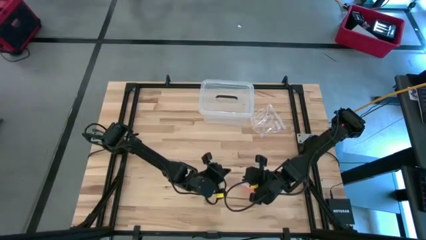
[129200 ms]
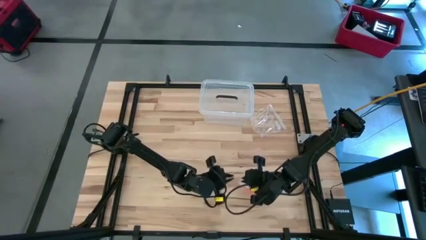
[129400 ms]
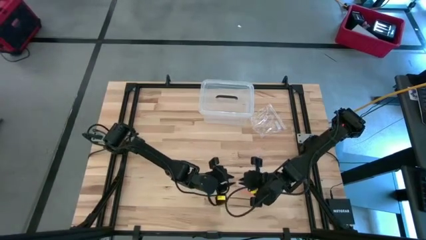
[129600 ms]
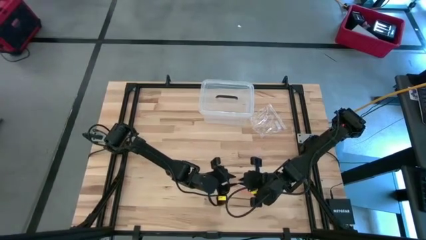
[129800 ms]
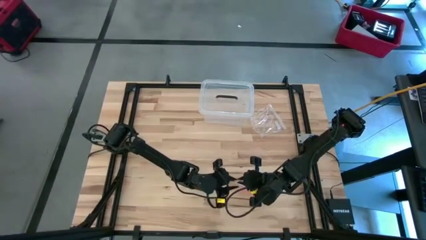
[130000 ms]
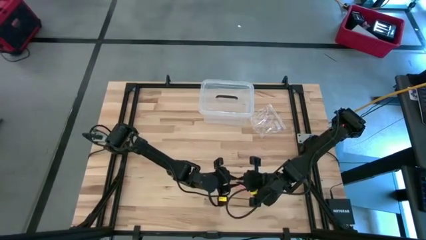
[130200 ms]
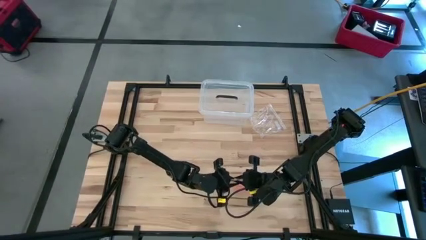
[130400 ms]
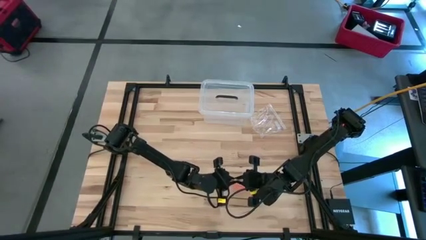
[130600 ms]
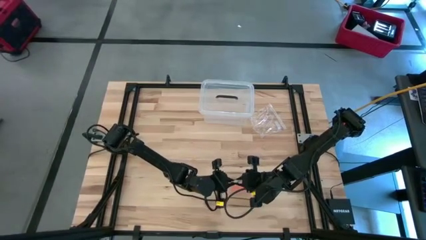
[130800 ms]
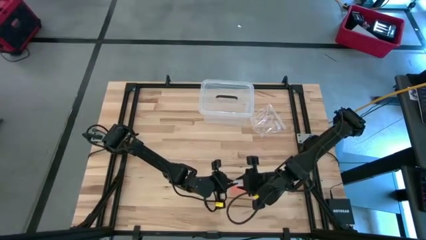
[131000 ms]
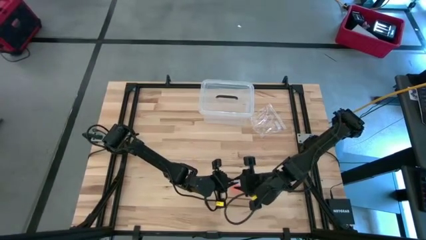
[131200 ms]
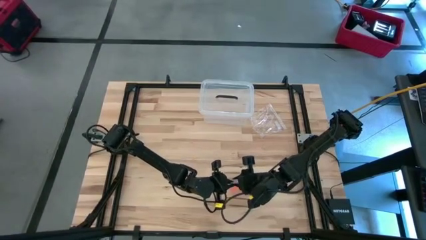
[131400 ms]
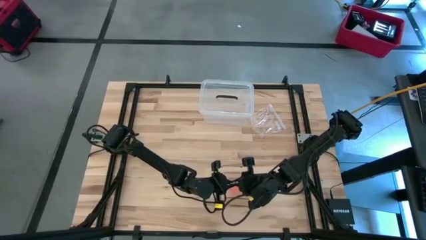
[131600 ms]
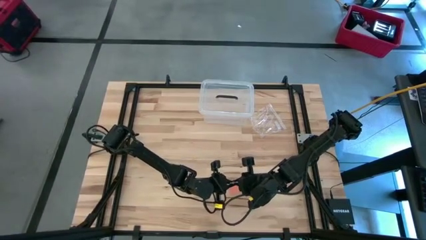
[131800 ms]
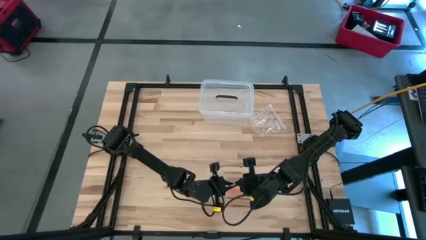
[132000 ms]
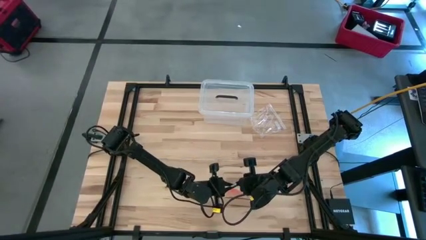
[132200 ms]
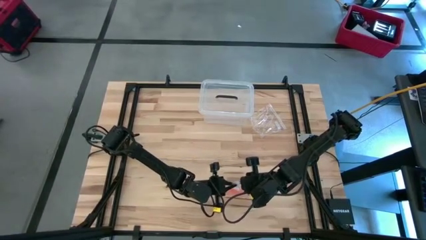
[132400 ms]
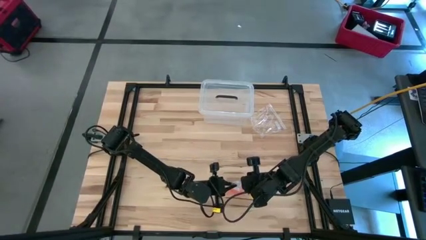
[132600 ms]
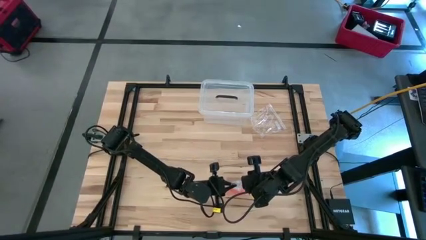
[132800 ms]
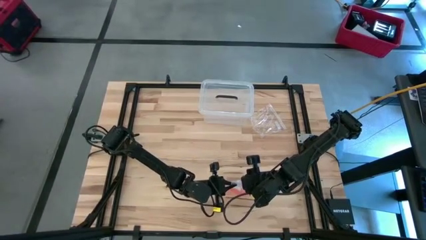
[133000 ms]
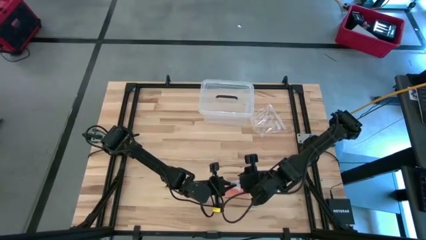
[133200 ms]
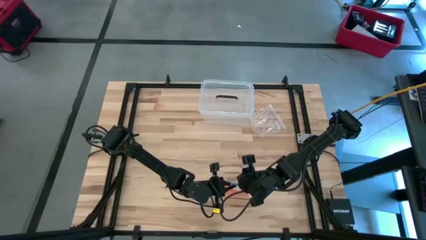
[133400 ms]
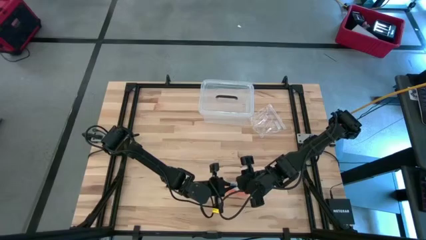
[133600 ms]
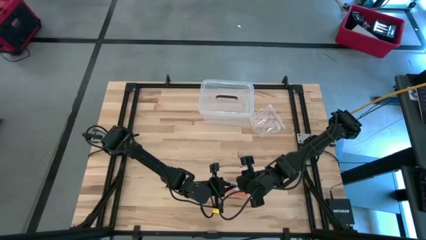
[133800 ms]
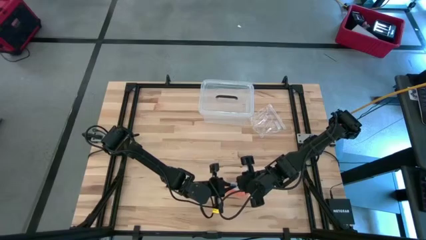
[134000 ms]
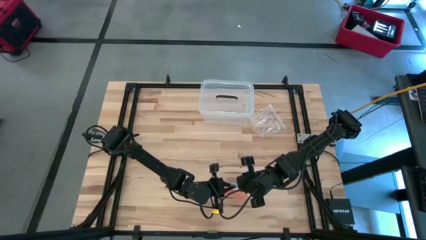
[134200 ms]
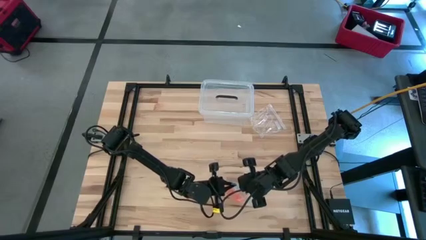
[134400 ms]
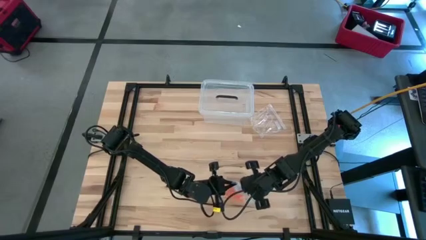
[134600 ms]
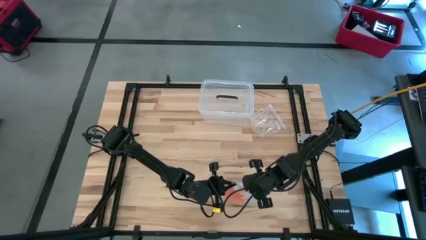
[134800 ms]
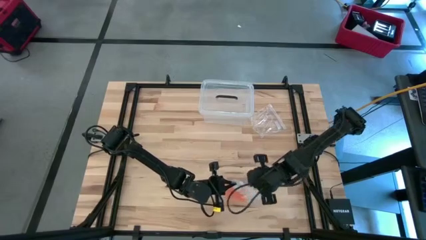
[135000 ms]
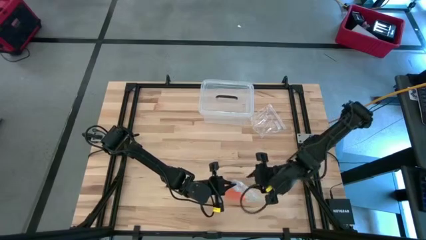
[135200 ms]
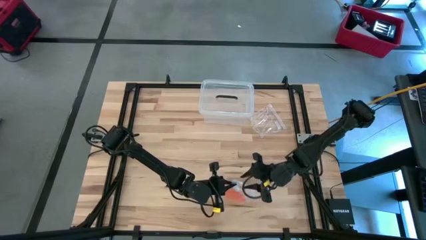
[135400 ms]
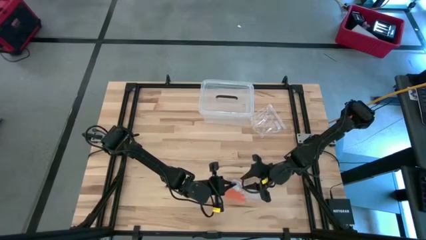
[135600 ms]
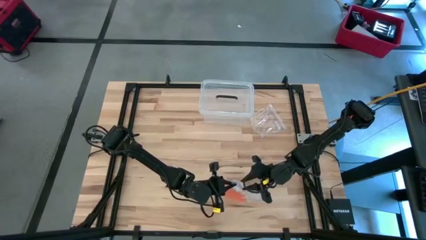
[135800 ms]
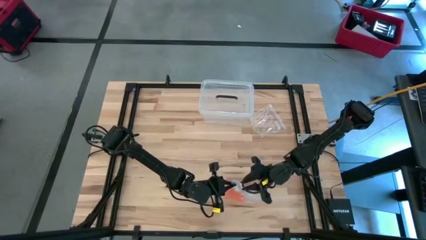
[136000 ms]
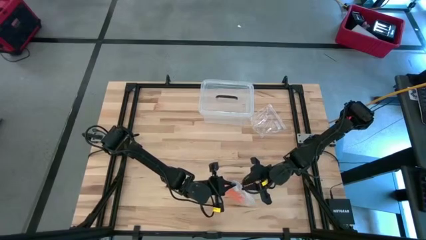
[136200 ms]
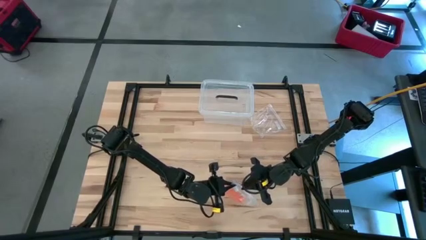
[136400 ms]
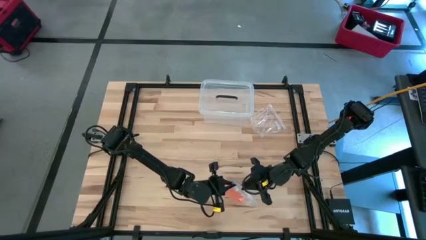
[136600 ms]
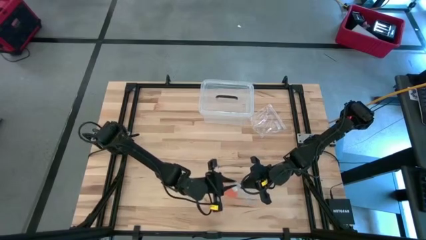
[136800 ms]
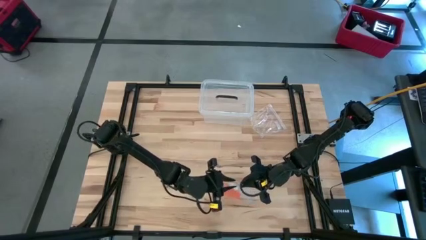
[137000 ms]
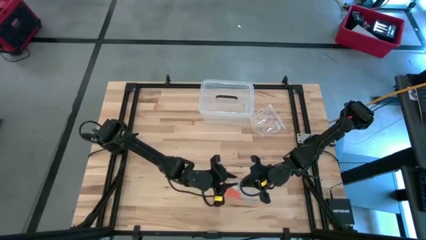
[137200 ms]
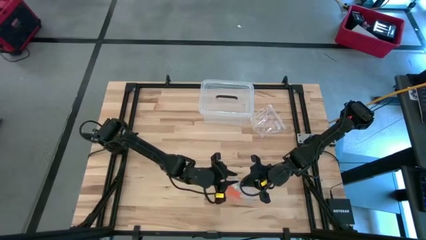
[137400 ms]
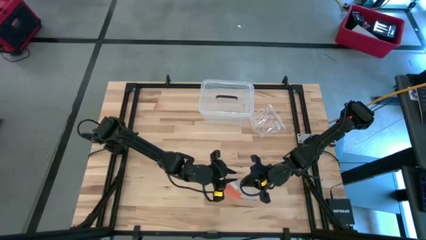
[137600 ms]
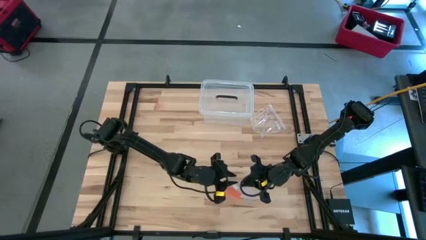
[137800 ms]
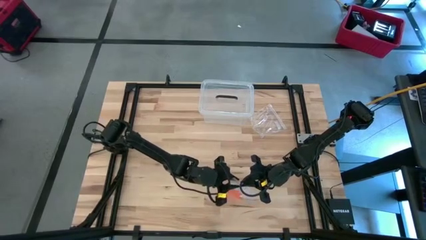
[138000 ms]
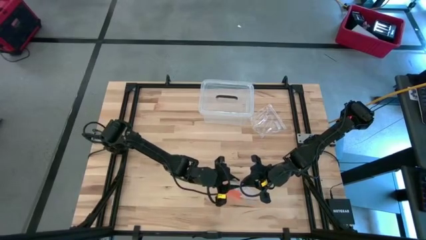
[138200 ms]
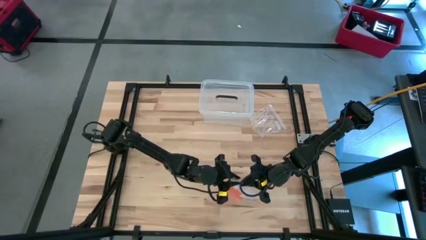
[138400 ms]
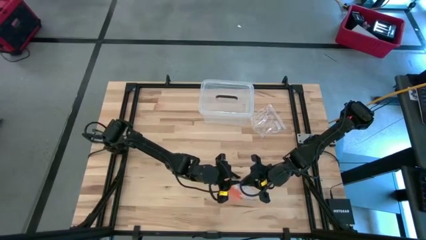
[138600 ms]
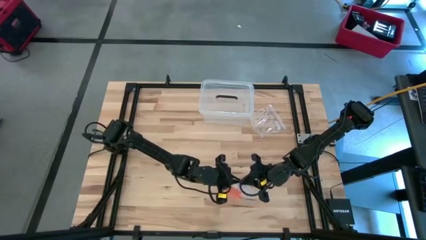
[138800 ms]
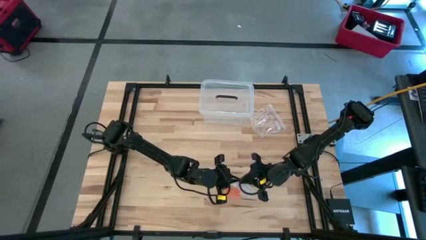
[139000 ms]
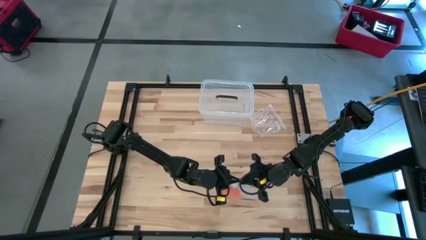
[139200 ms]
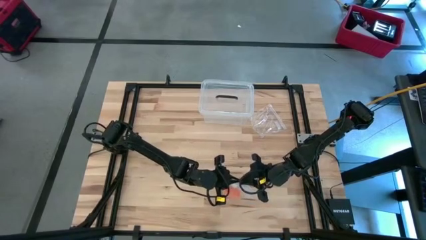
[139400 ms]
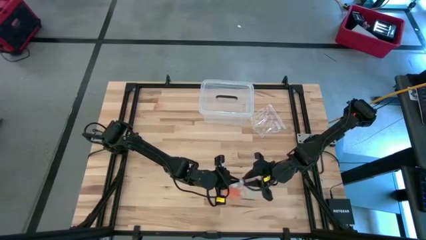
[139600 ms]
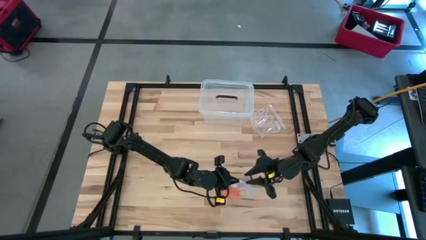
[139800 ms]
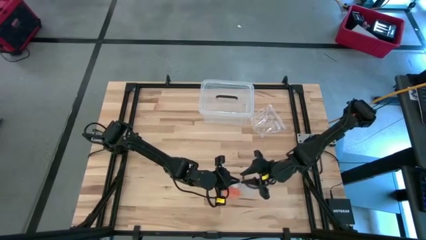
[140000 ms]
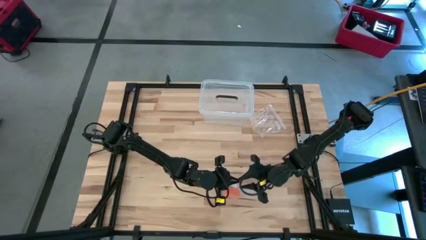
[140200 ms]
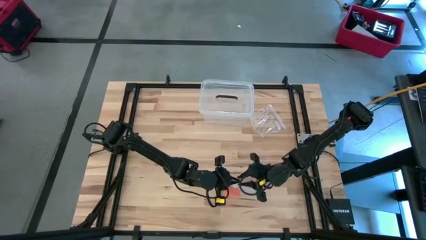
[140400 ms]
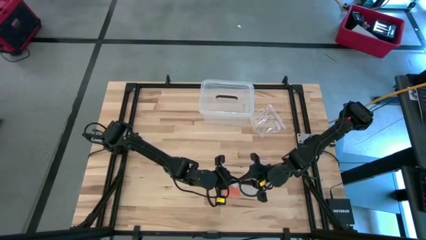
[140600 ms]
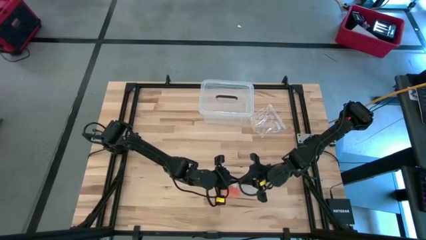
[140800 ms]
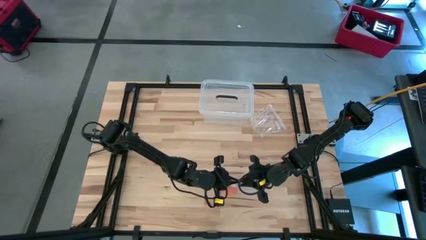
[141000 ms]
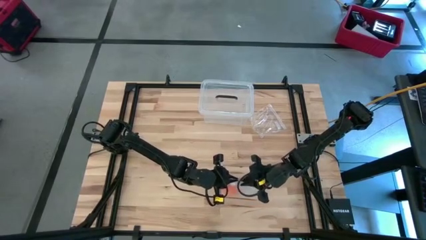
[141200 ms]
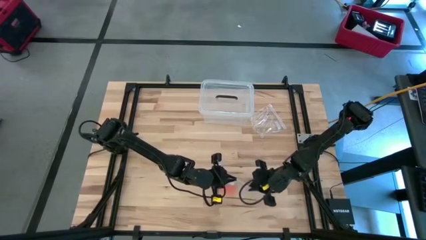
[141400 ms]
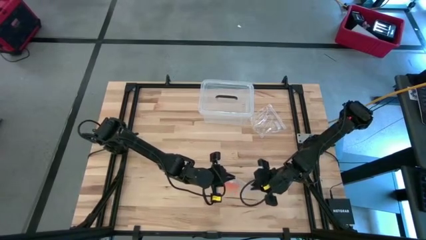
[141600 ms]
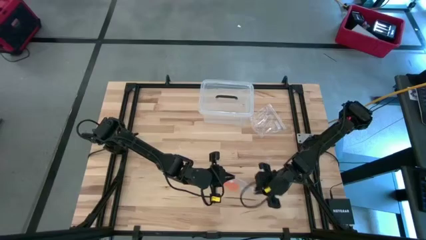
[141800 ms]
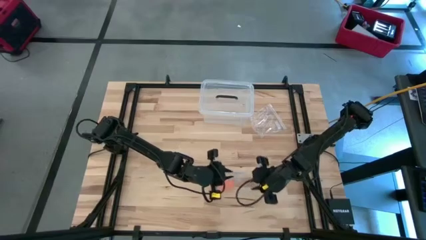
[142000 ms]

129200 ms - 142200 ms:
Task: Roll bandage
Close the transparent zip bag

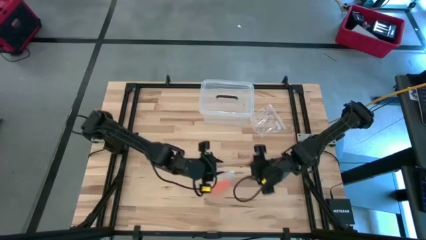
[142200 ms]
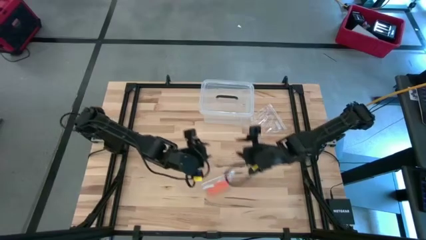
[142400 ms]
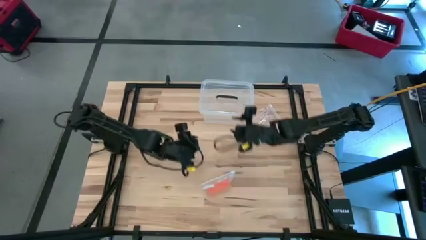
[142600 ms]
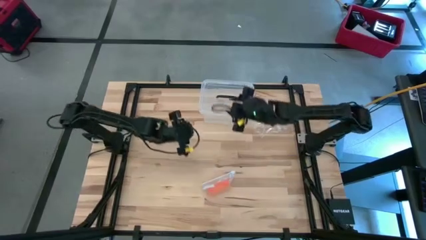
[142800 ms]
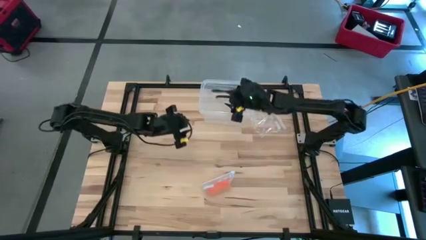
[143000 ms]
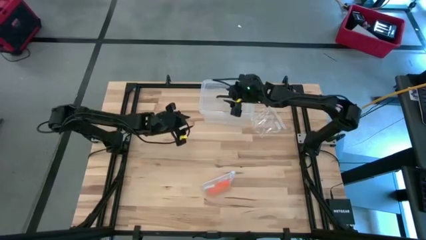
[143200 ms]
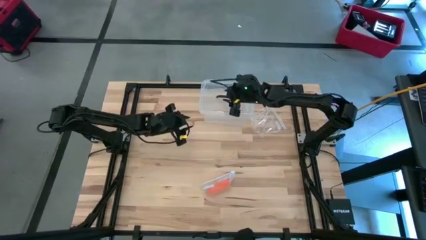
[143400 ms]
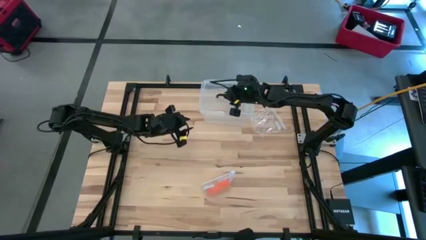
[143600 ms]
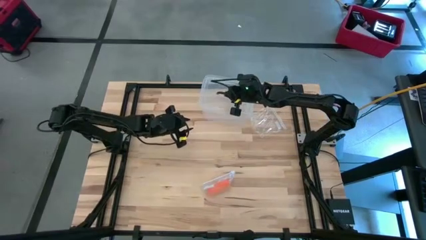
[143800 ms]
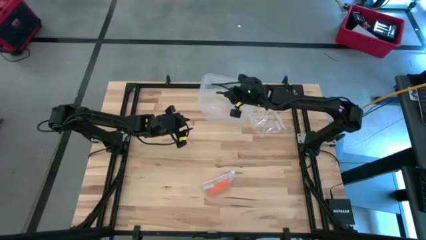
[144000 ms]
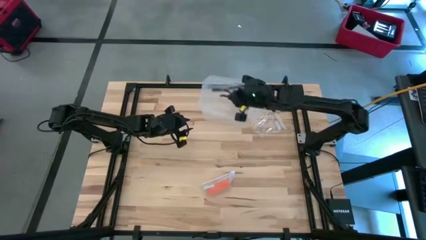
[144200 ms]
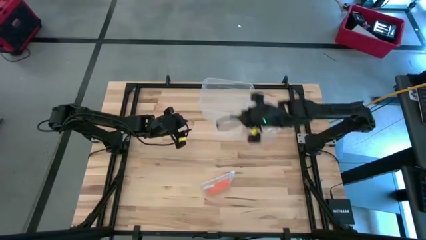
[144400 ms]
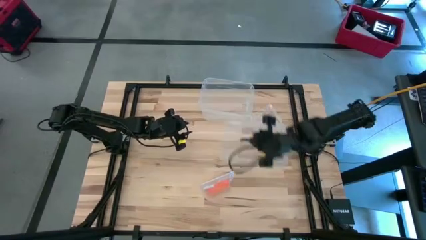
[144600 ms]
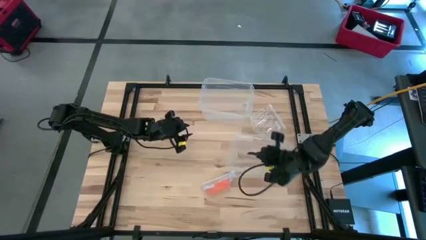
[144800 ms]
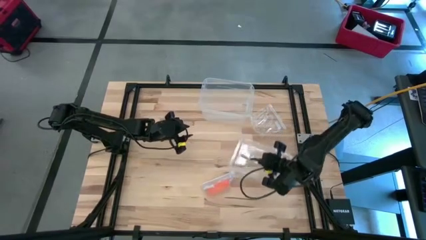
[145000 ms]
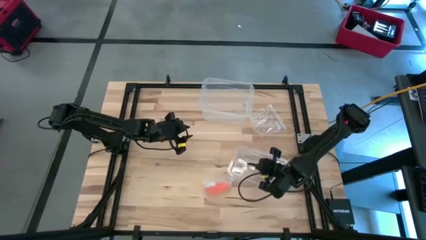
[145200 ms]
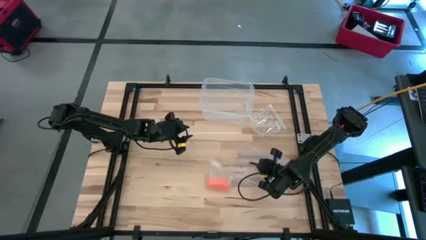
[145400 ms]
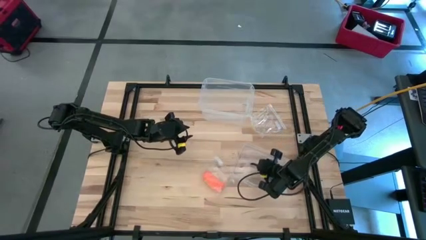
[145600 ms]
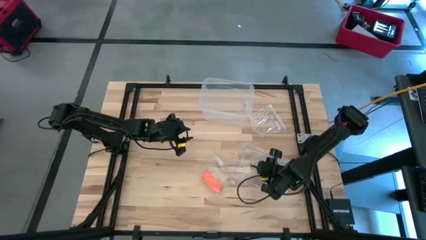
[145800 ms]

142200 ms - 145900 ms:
Open the transparent bin
